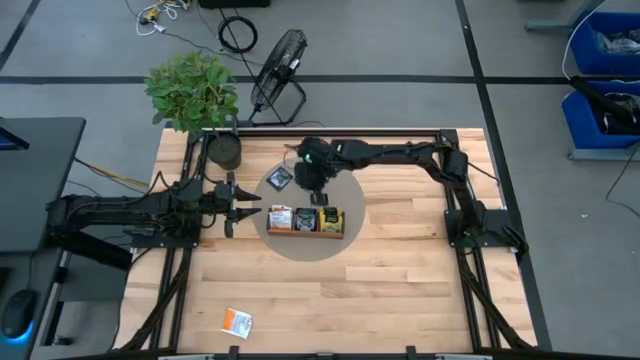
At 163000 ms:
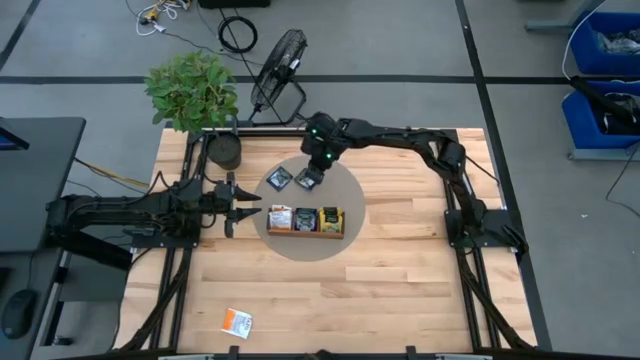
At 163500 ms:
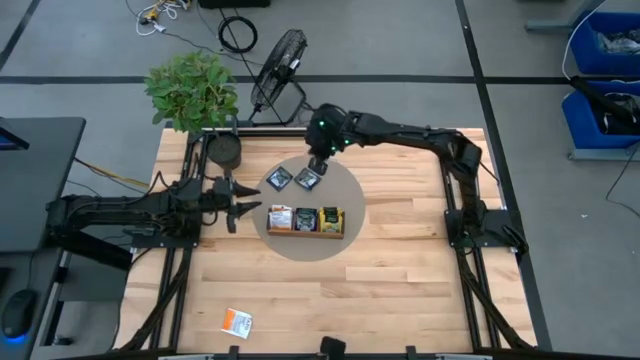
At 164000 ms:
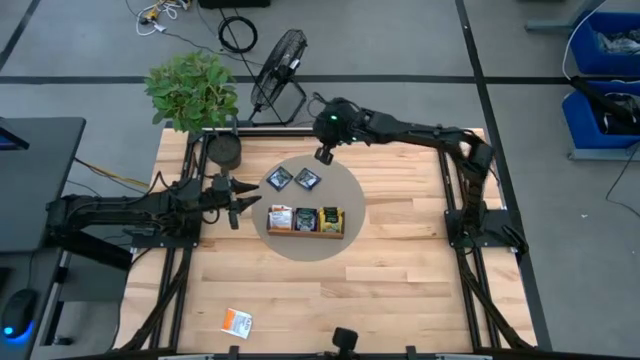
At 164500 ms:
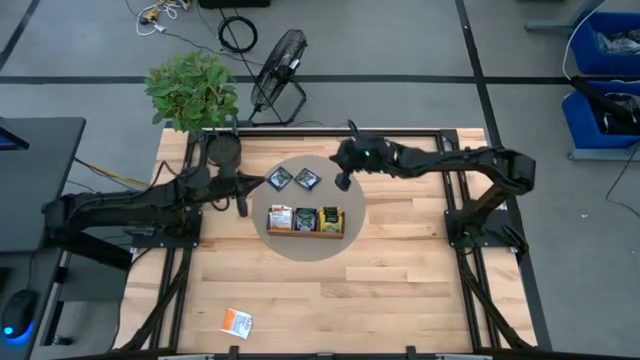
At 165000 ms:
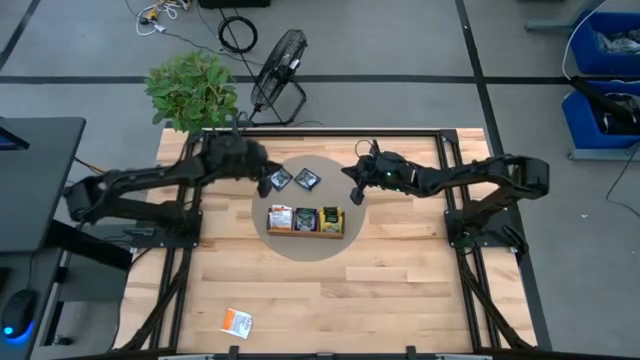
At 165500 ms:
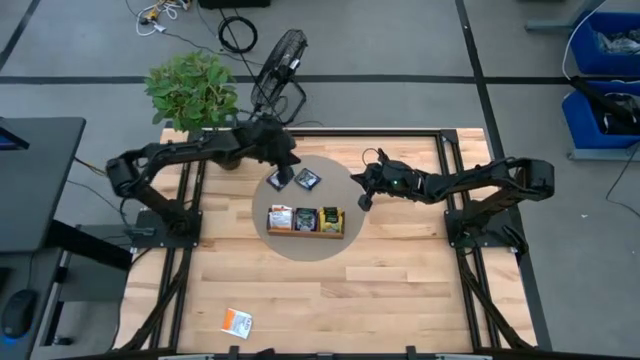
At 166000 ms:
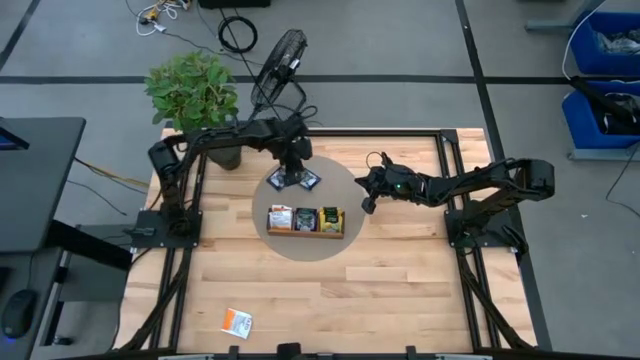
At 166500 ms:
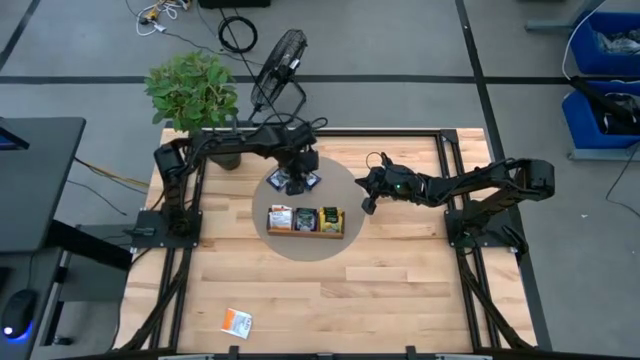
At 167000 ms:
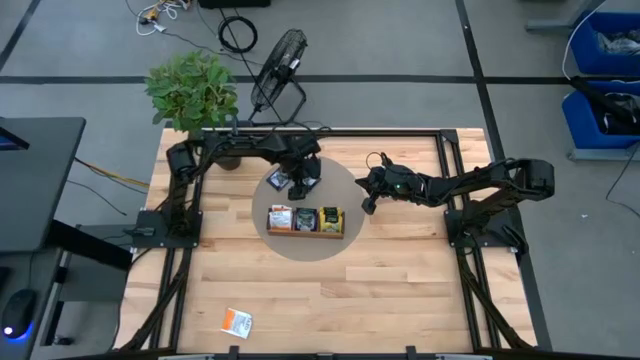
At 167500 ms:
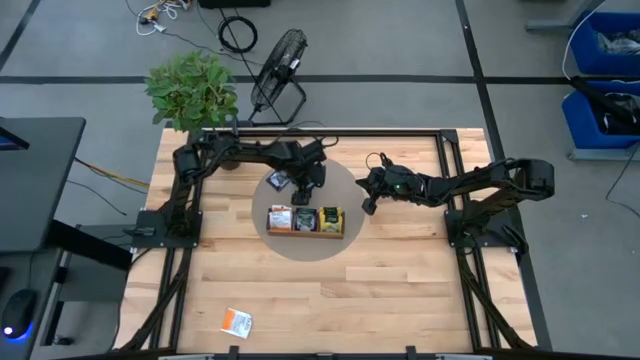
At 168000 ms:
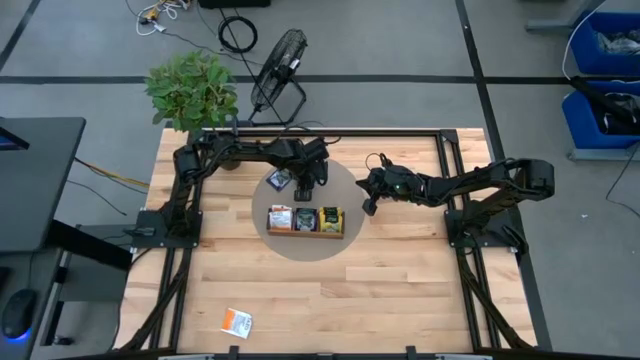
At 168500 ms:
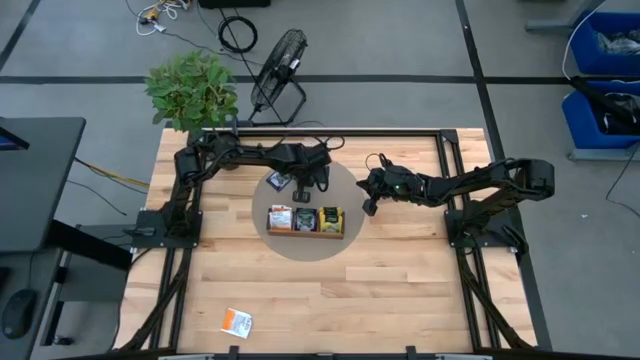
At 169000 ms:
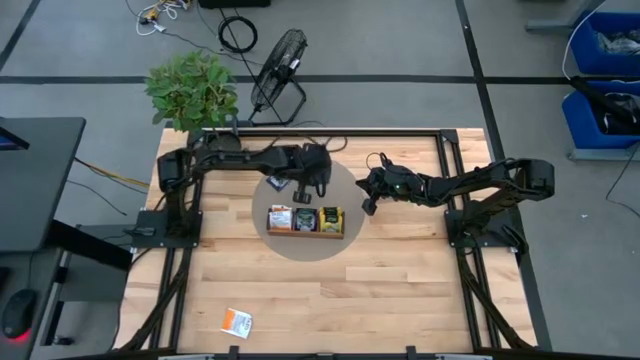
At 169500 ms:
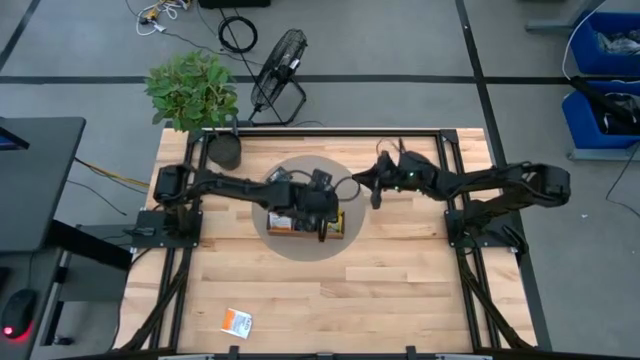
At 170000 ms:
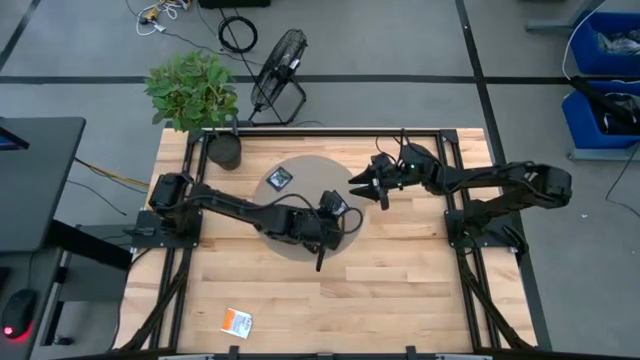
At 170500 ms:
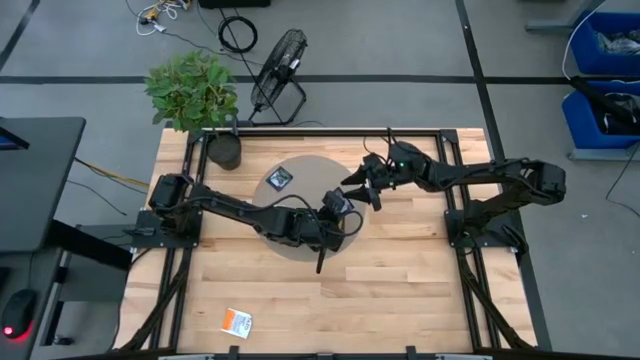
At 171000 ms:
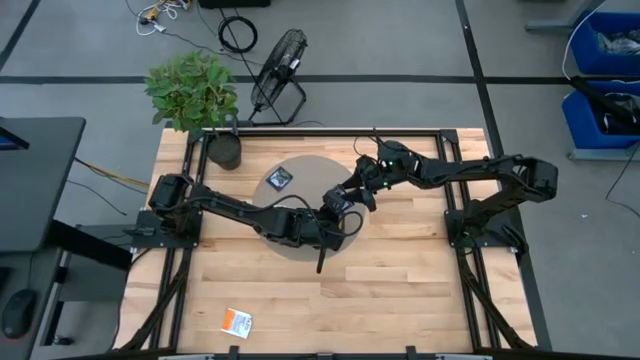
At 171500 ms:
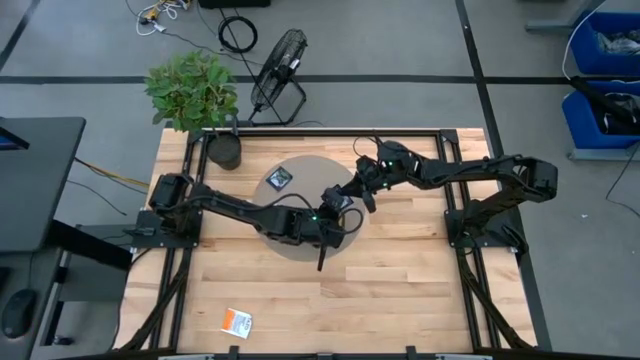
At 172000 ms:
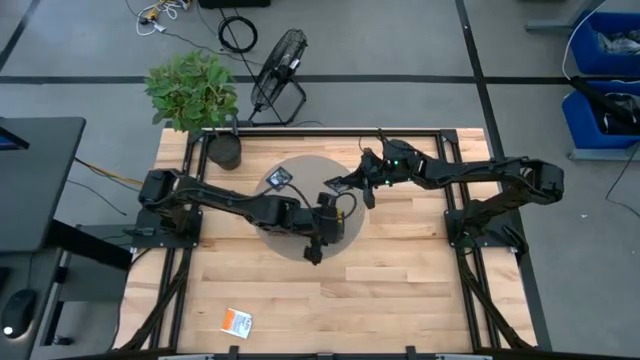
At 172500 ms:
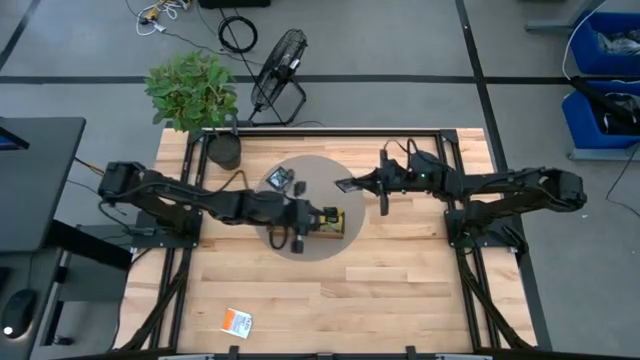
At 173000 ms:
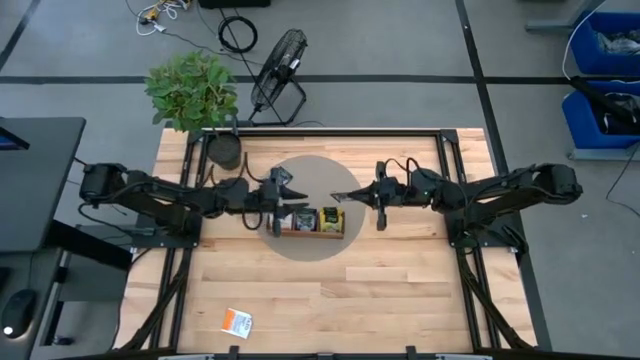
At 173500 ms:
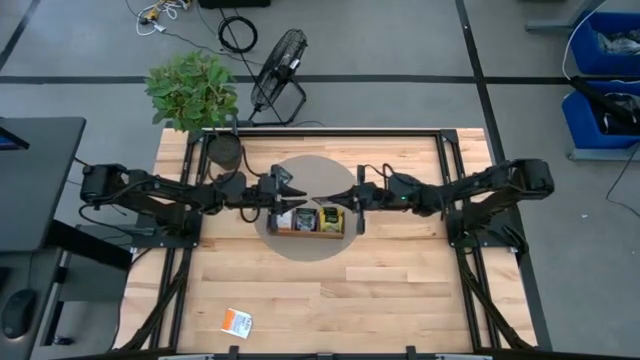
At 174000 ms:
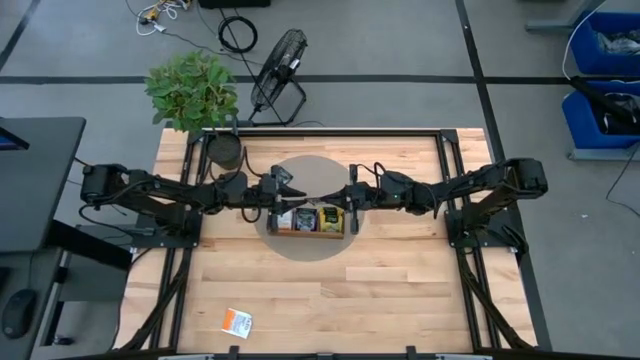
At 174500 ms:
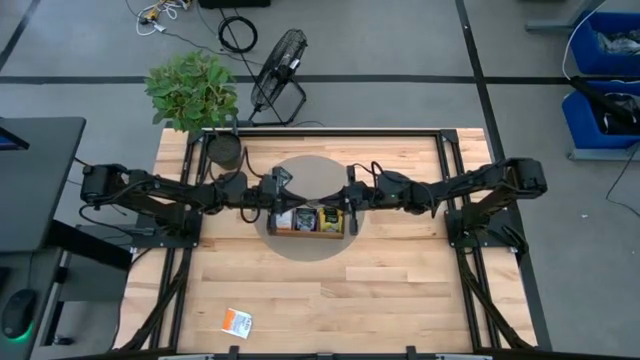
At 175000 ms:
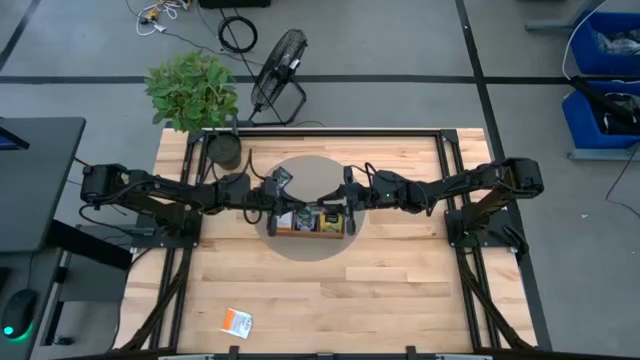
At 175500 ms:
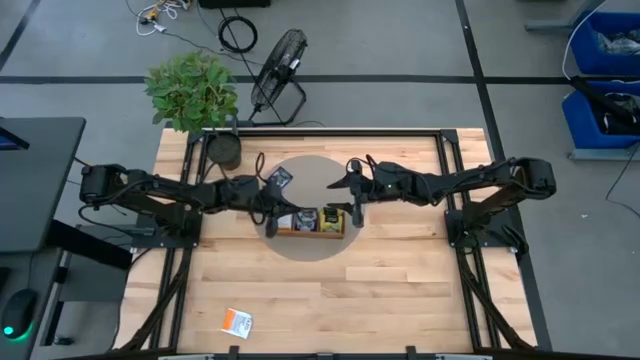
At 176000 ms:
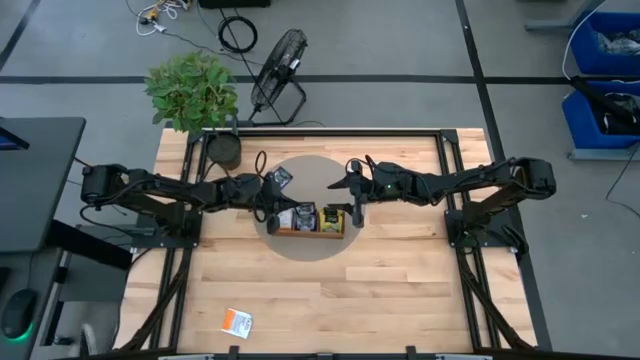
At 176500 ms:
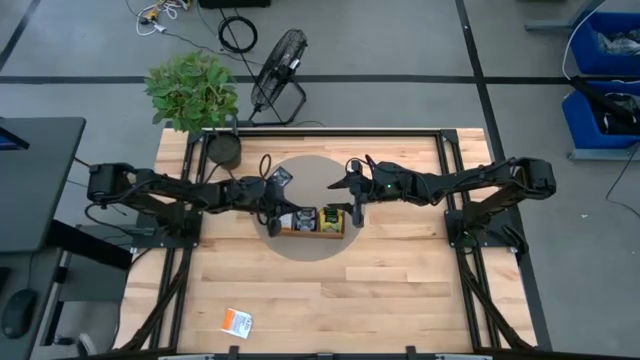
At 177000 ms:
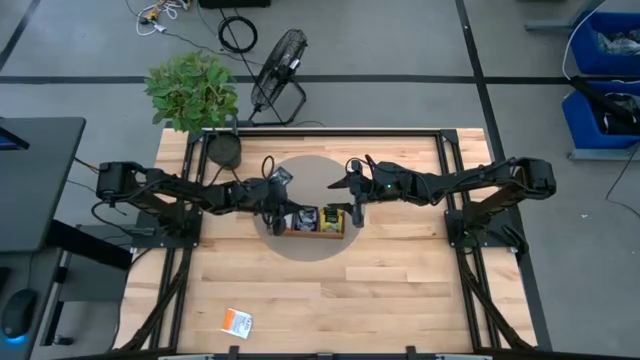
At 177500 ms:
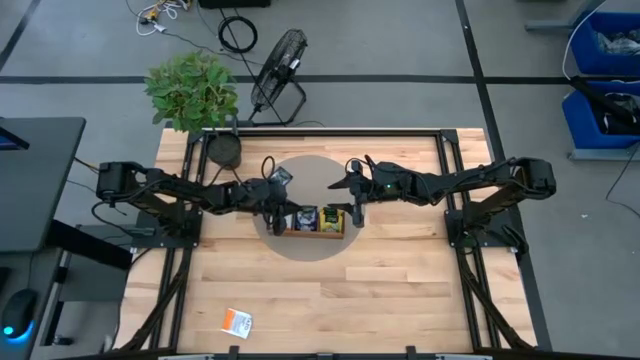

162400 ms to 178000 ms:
Task: Pick & Place Tea
Put the right purple tea bag into the middle compartment of the wooden organizer

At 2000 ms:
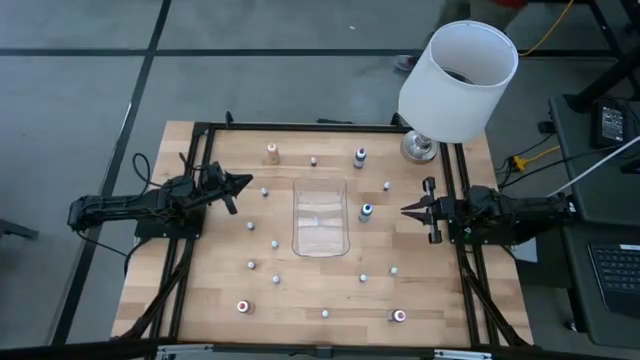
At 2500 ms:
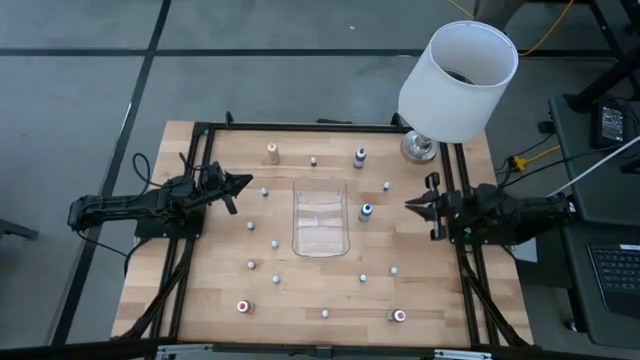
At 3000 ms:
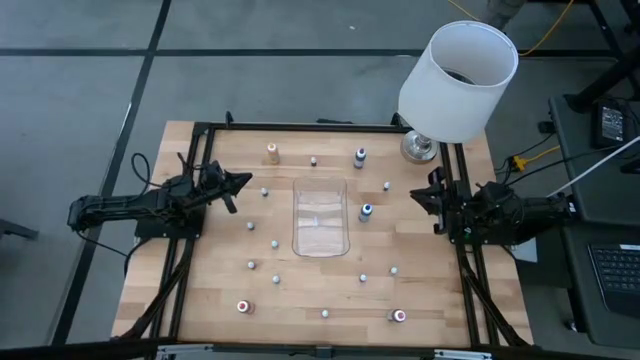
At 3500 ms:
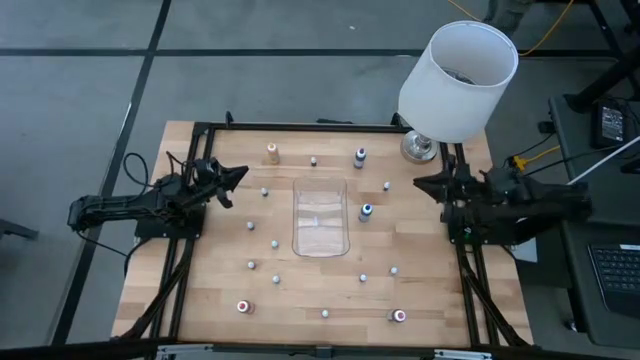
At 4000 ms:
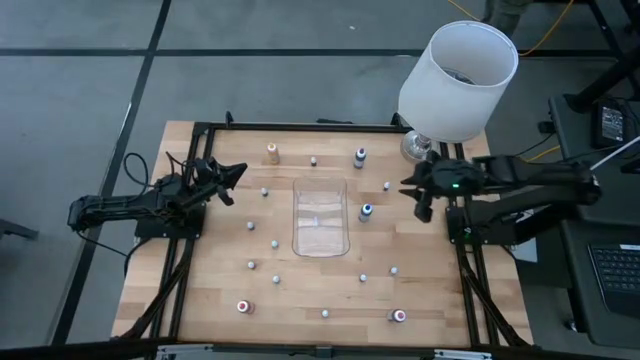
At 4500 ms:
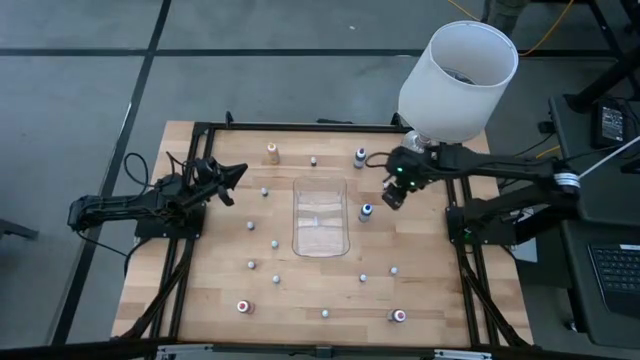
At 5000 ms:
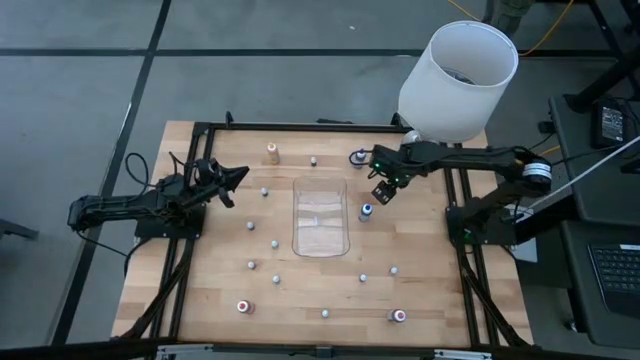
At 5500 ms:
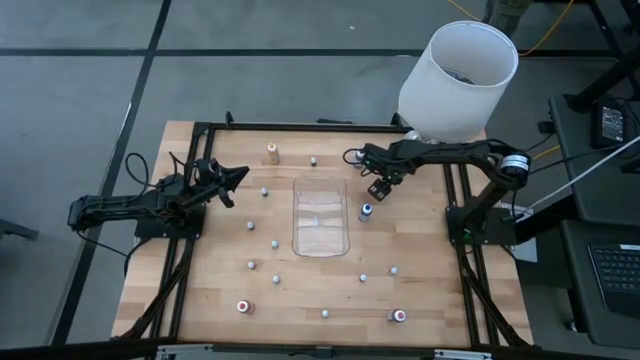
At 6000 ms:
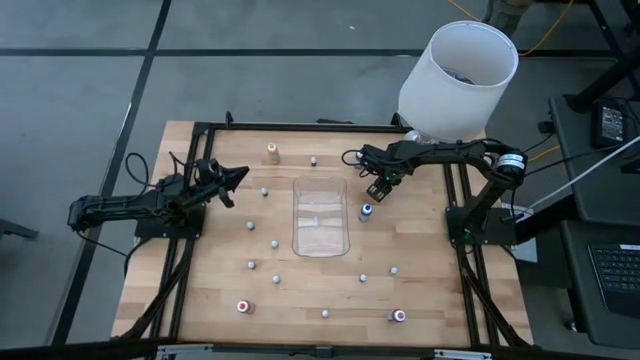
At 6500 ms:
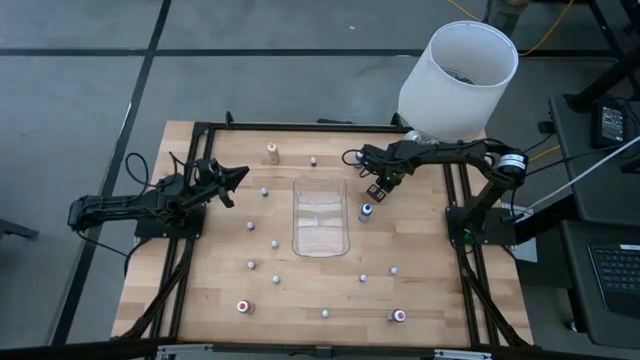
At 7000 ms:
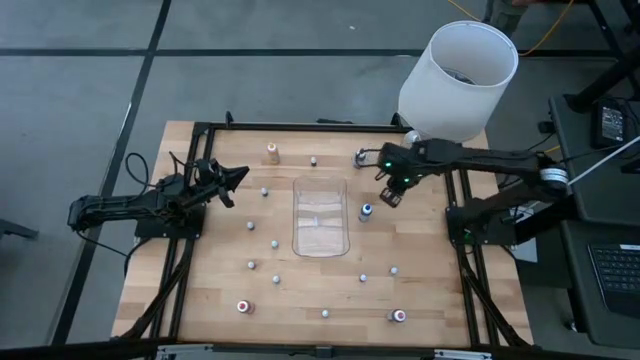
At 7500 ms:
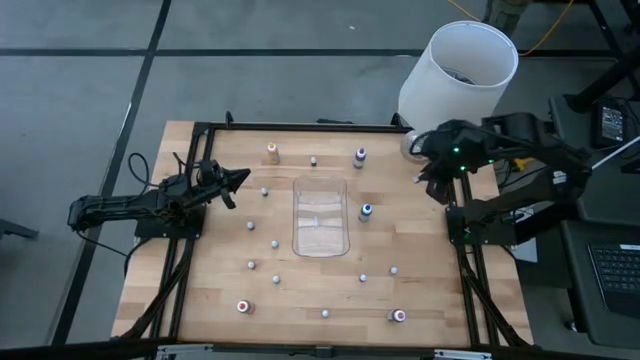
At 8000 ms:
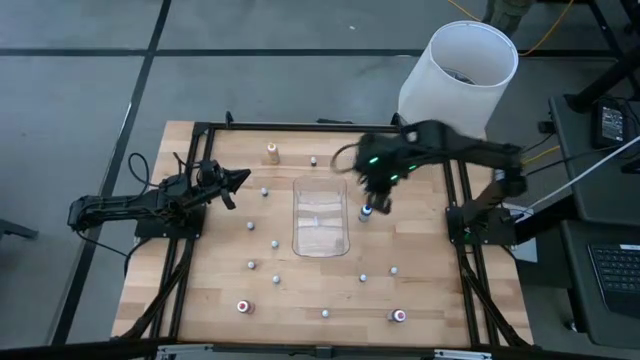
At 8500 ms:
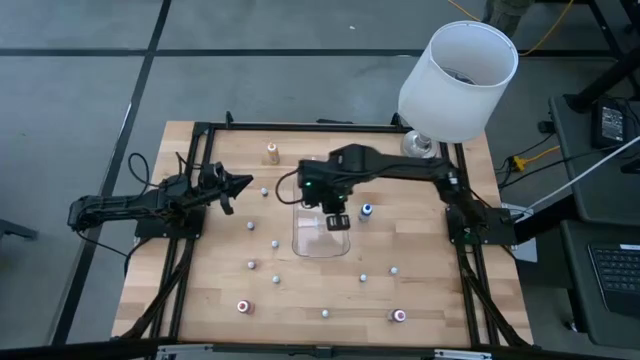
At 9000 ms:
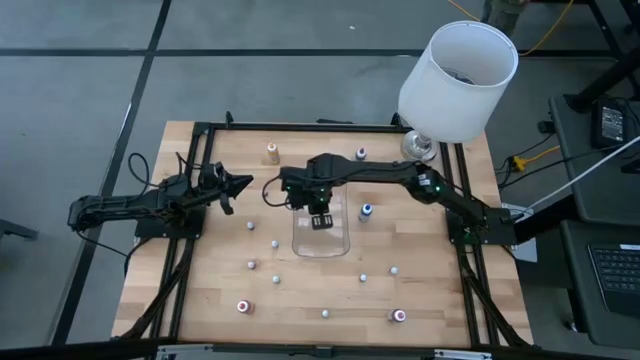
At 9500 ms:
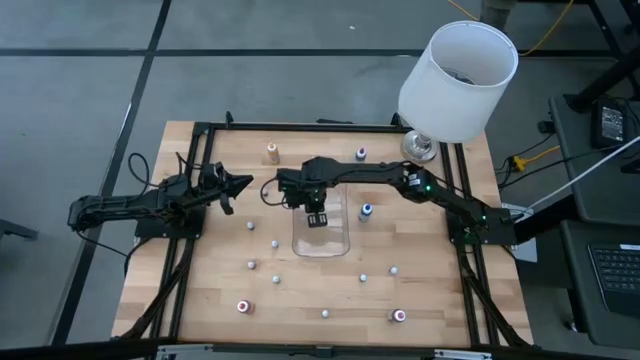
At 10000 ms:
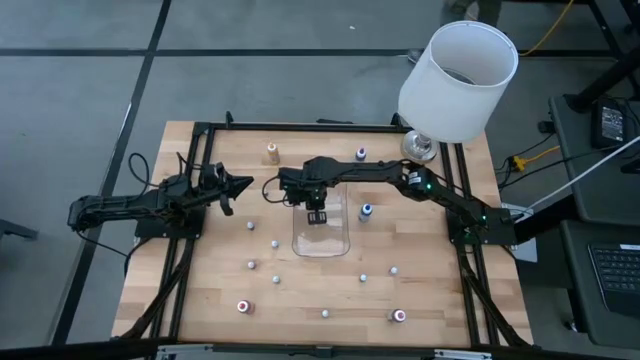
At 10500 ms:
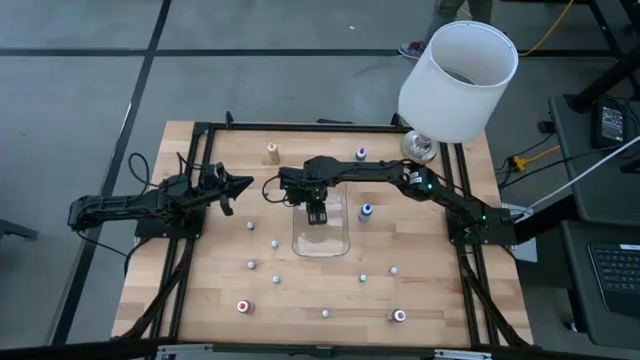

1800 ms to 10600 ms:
Task: Pick & Place food coloring
Put the small red food coloring into the transparent bin
